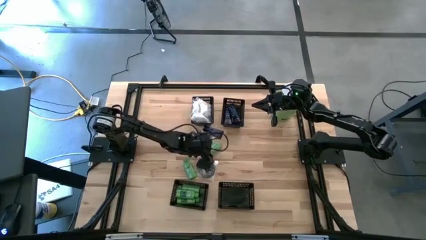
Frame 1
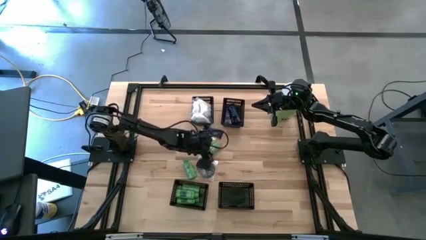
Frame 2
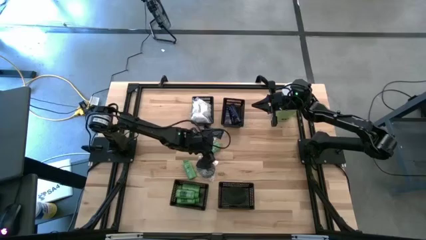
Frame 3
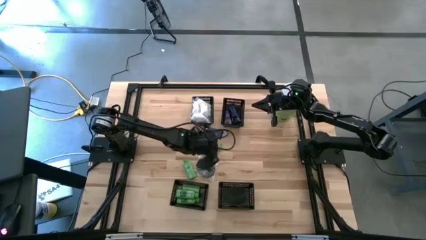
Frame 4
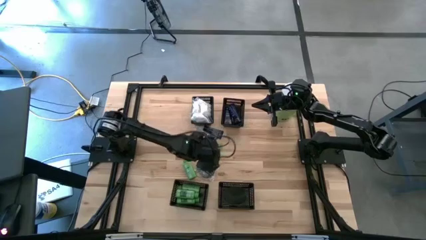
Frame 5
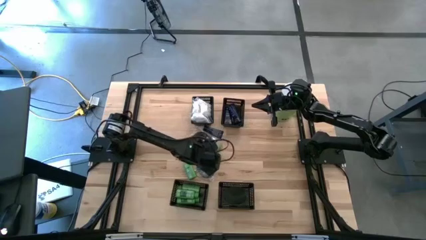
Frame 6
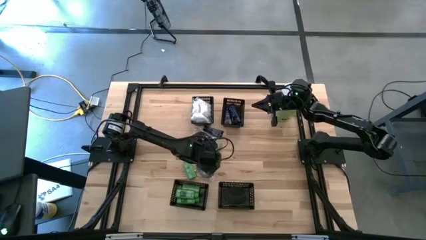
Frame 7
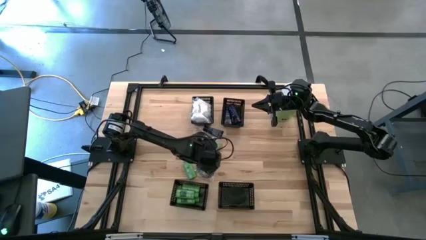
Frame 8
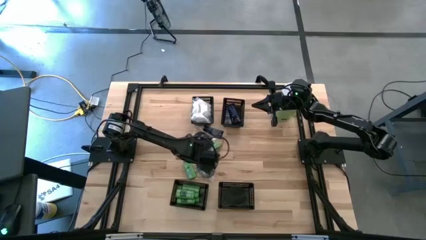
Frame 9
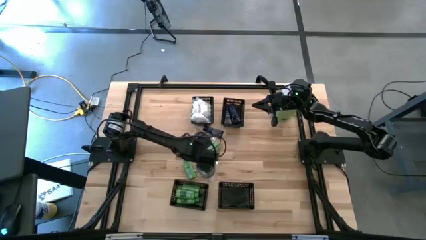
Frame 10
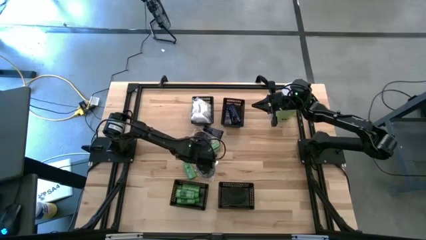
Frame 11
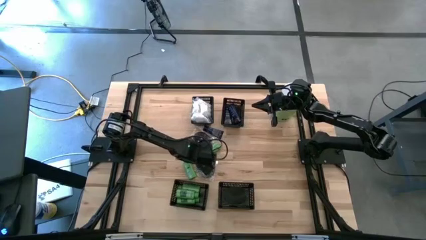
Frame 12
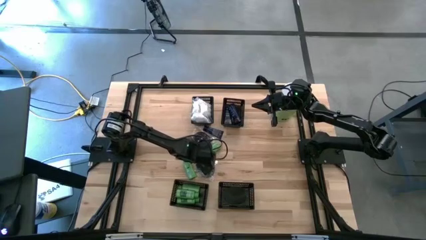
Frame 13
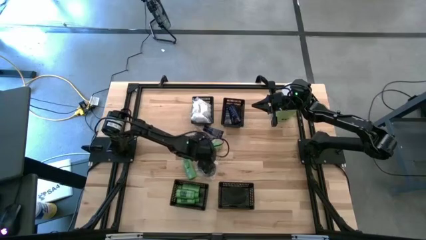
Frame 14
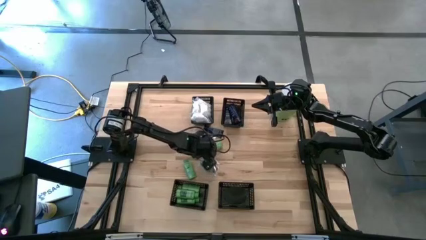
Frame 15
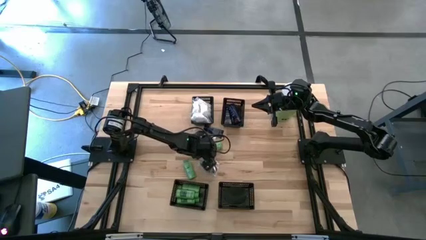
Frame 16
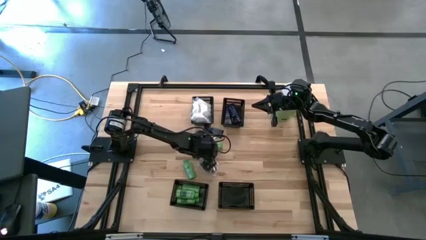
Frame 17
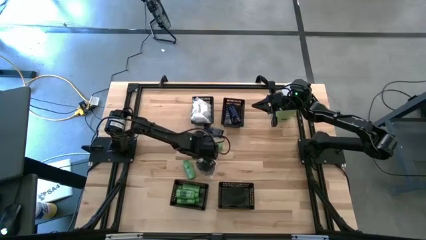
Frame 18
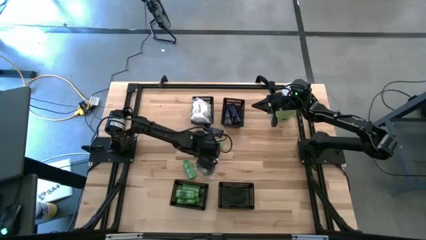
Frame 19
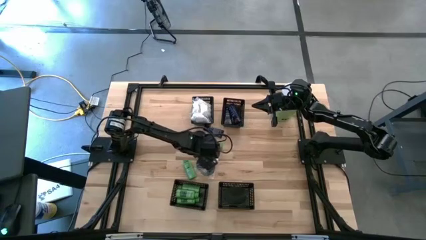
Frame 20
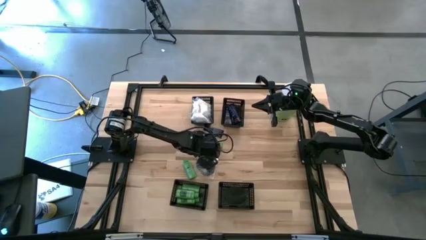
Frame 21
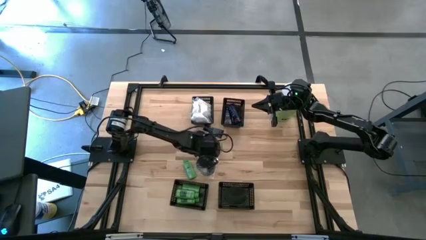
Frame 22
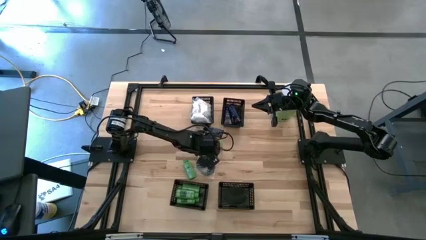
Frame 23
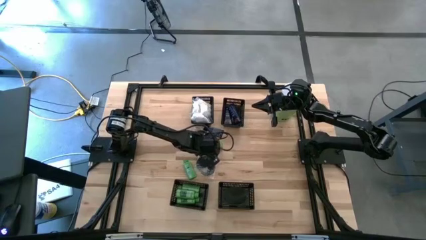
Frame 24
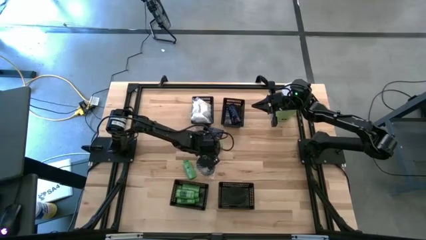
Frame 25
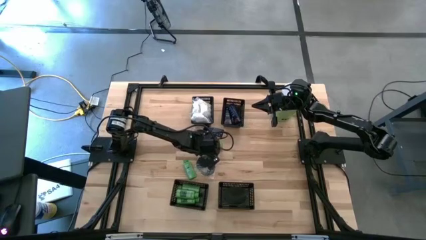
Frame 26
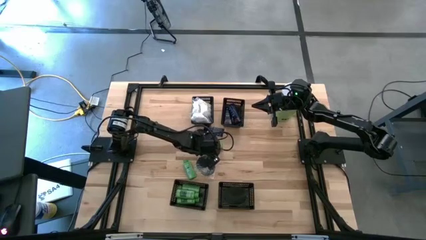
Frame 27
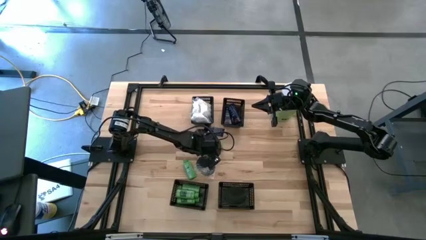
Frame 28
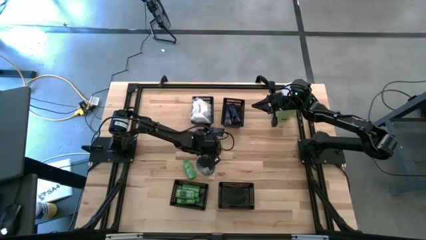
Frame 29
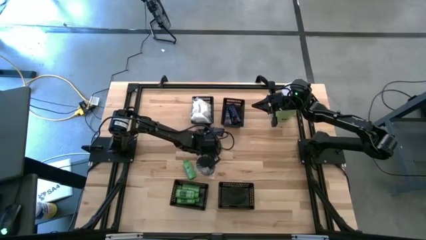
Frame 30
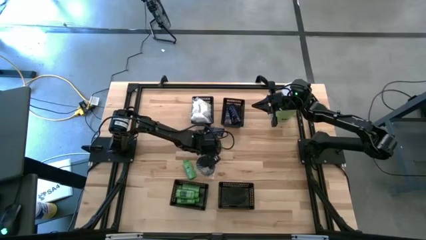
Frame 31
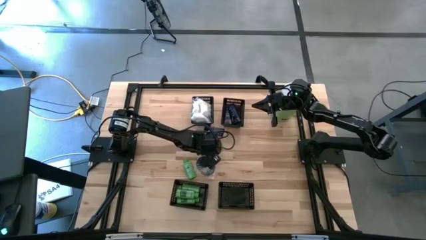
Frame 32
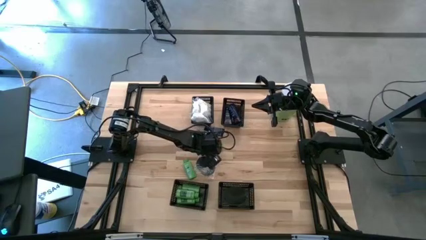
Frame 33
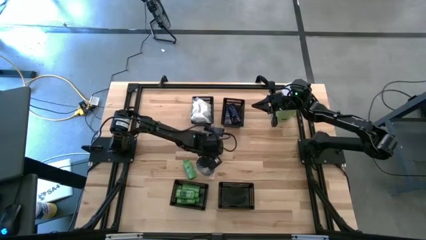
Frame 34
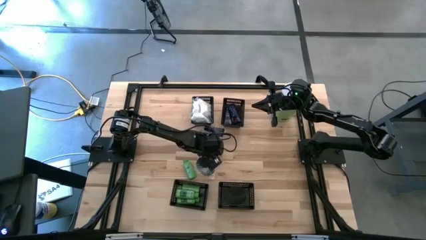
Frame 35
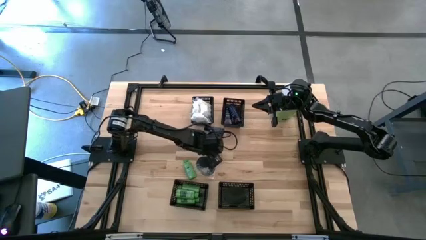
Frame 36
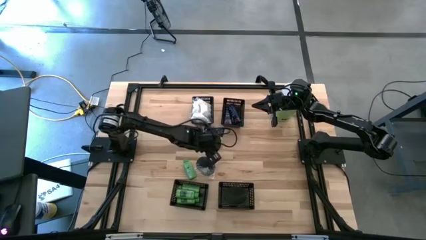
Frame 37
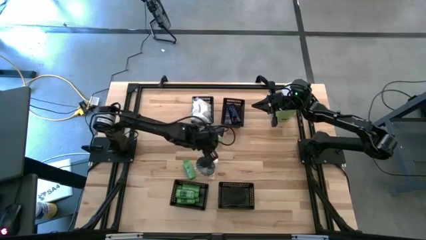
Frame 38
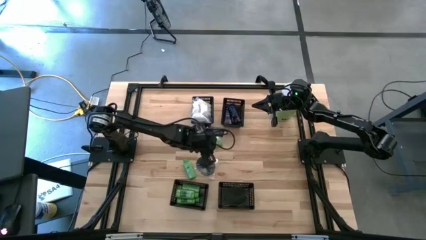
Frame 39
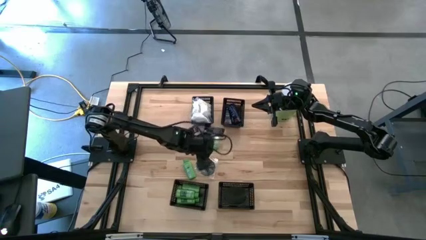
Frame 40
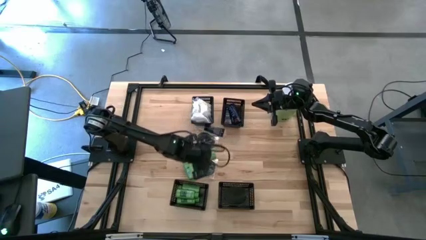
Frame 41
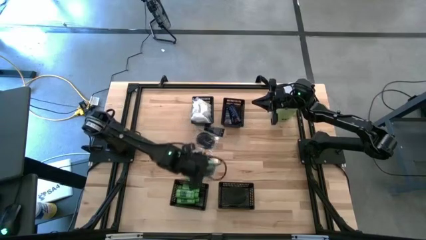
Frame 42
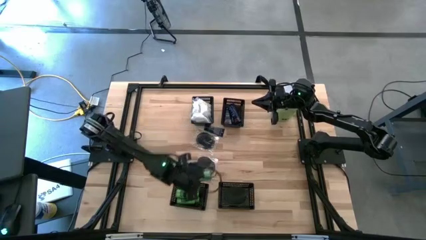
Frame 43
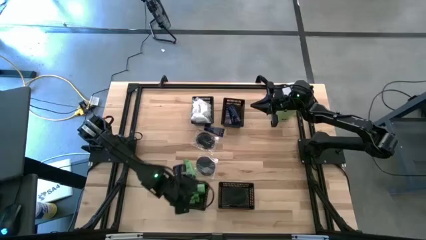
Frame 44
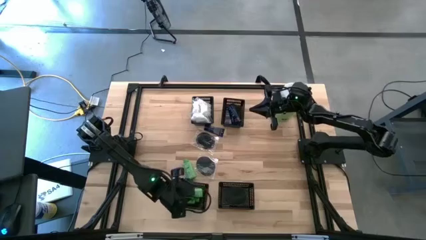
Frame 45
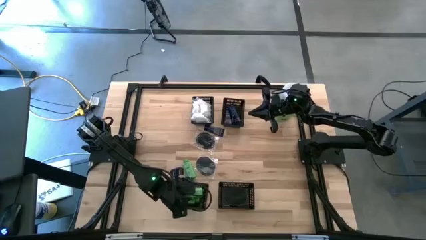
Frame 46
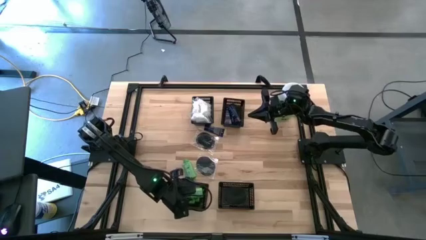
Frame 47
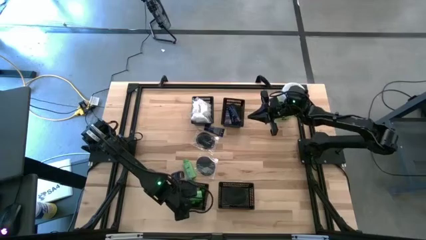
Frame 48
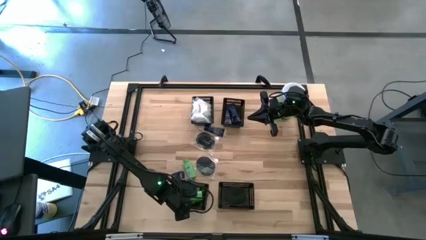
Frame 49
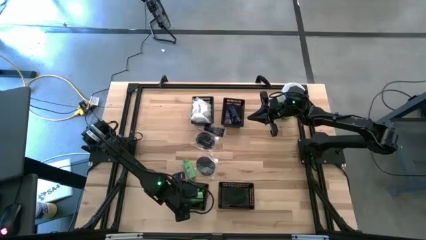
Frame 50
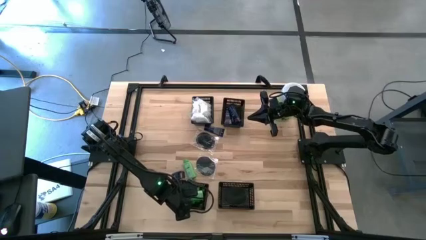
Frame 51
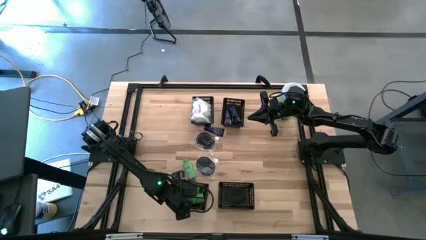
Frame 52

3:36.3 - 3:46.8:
Task: Pick & Place Travel size toiletries
Put the green shampoo into the bottom left black bin

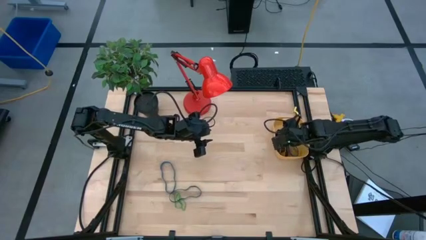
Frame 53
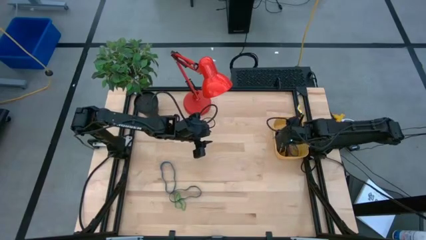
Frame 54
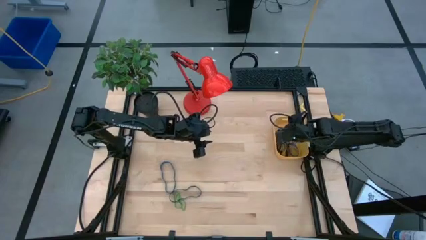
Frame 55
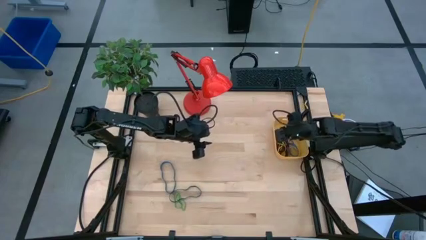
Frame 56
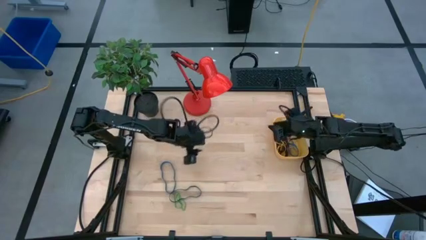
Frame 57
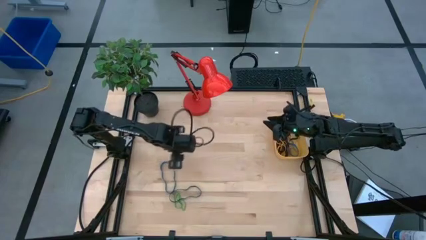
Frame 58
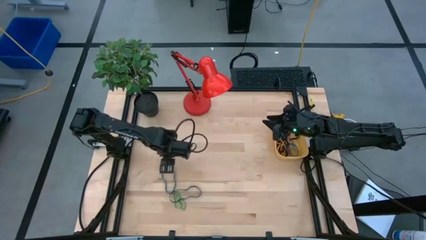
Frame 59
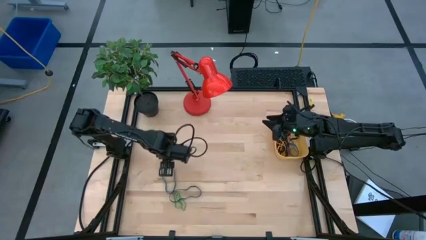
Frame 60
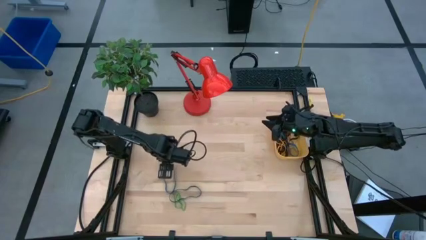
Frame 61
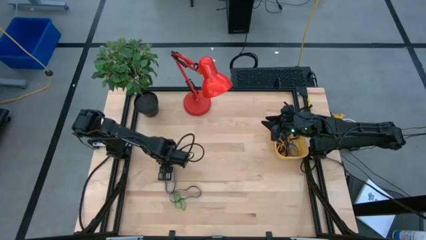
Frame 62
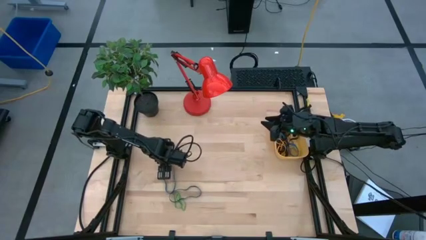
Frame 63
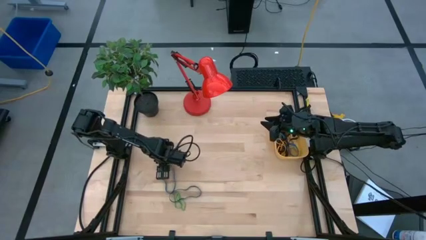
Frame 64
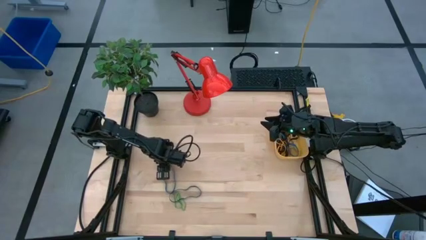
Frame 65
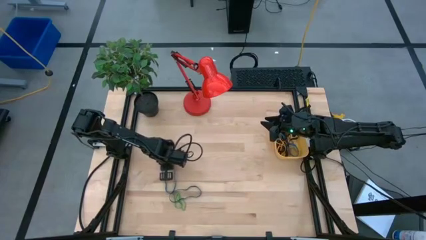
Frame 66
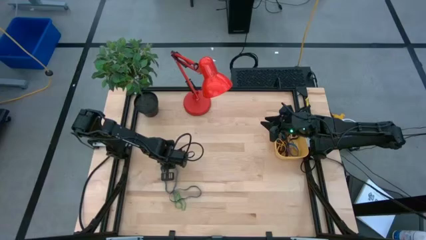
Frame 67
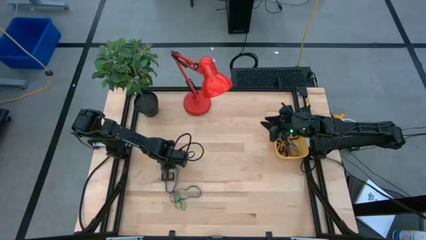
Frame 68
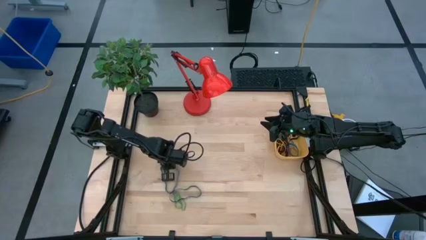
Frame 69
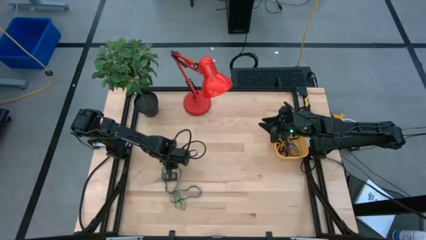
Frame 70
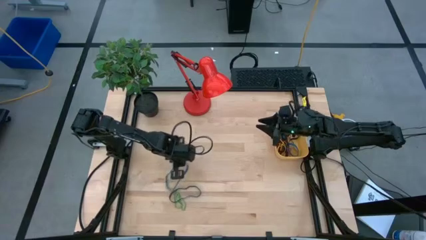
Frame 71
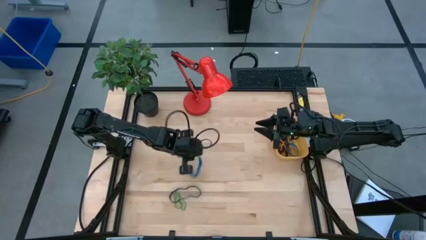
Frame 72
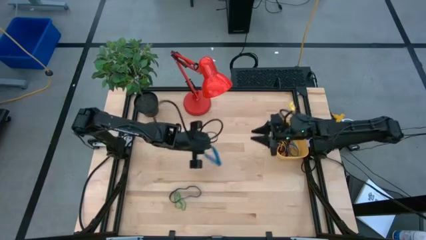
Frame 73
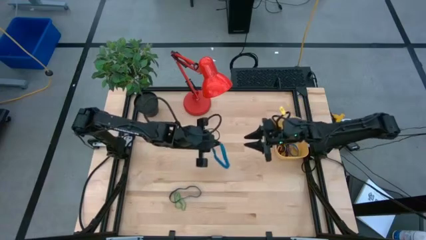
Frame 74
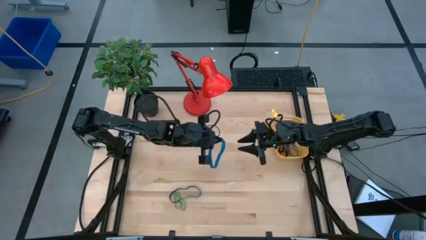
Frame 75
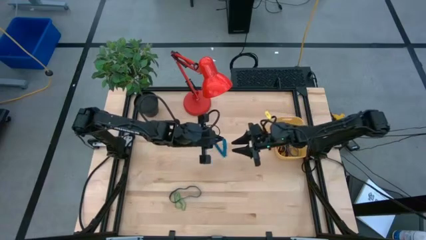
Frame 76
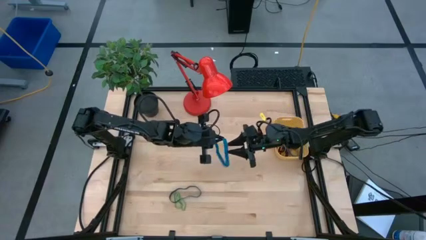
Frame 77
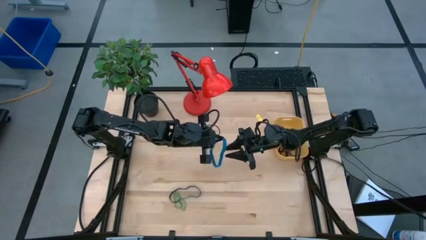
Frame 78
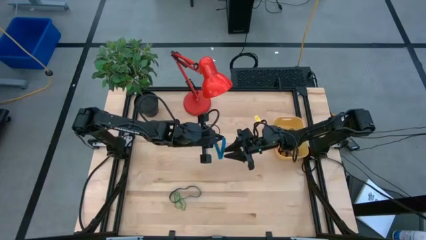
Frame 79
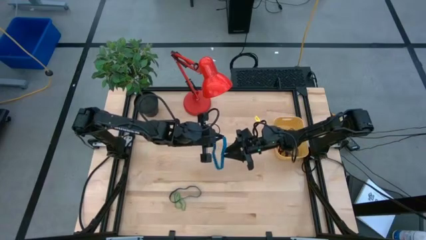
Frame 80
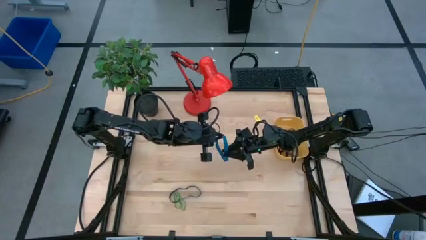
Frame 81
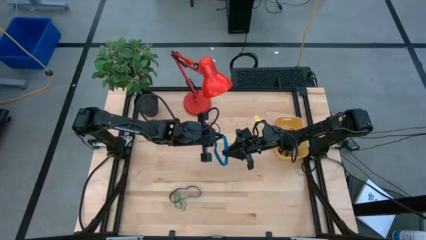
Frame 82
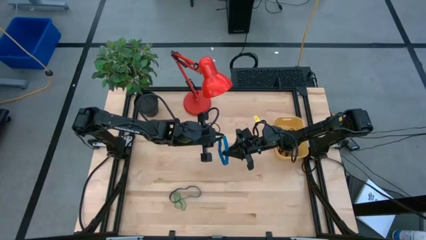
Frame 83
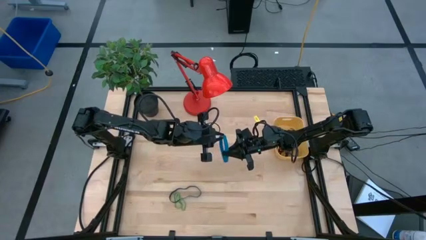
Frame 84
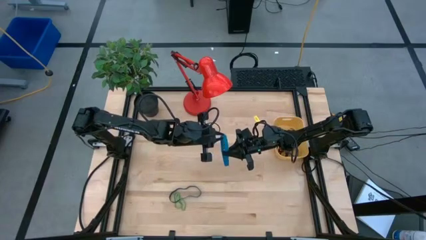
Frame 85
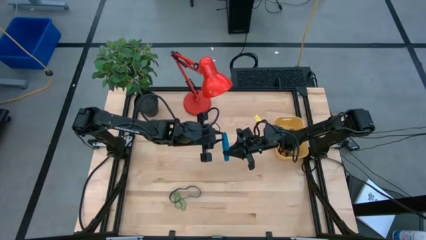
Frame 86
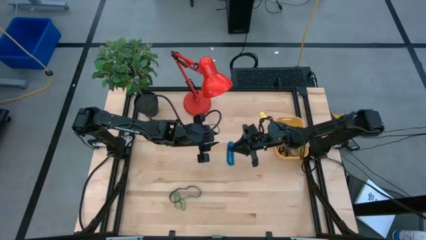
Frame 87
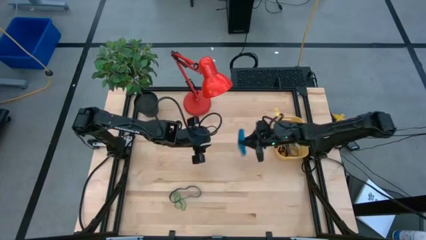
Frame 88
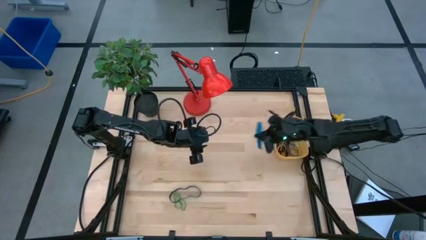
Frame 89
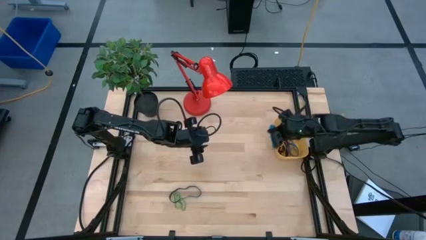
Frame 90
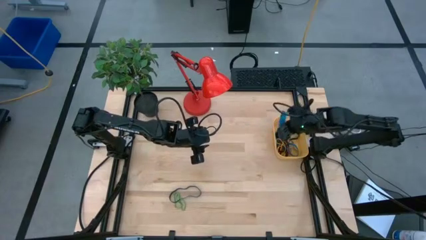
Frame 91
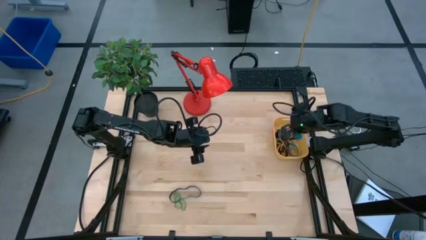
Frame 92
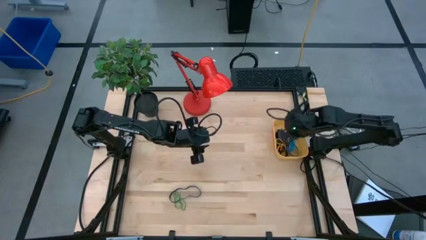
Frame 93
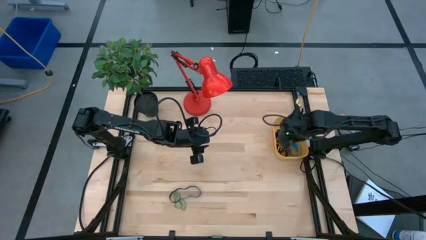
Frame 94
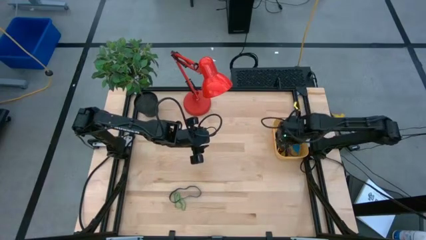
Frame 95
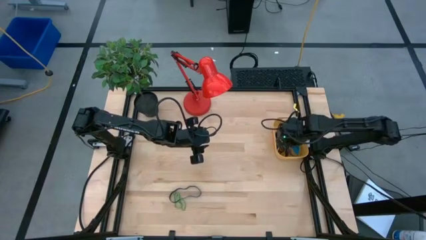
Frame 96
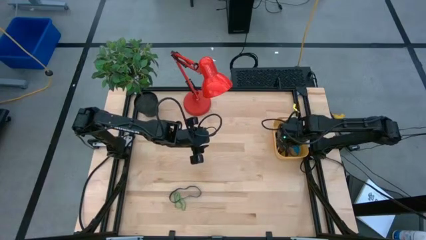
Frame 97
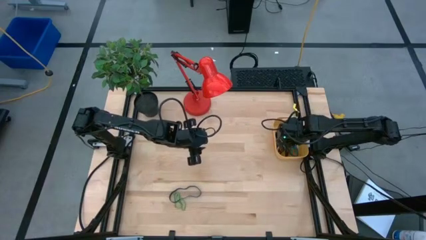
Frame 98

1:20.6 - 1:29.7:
Task: Pick and place rubber bands into bin
Put the blue rubber band into the yellow bin
